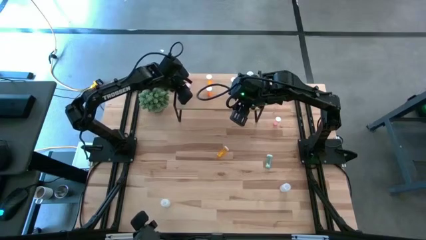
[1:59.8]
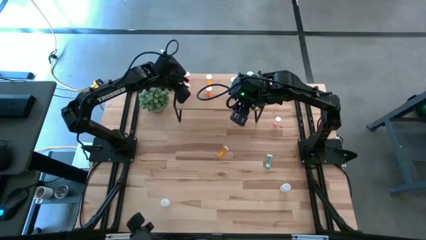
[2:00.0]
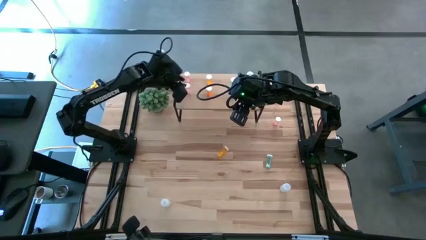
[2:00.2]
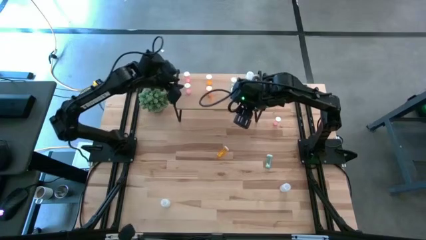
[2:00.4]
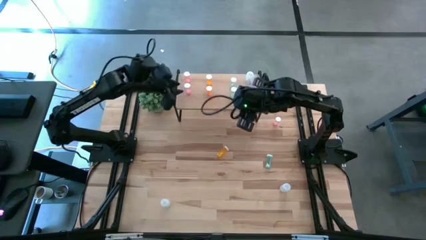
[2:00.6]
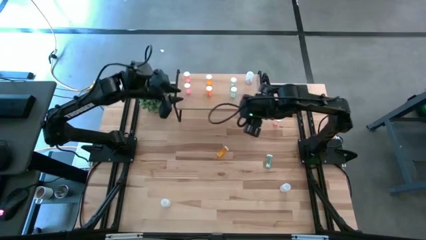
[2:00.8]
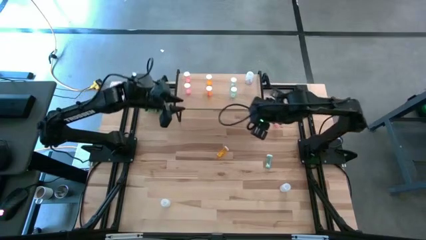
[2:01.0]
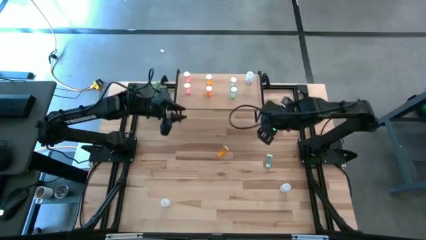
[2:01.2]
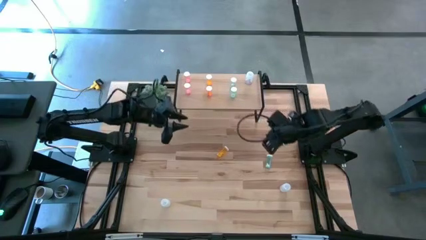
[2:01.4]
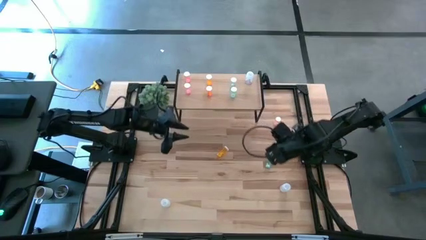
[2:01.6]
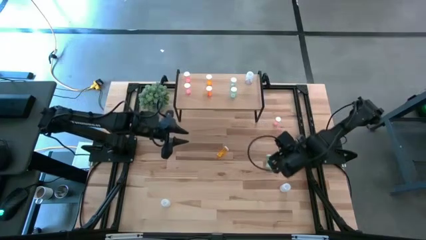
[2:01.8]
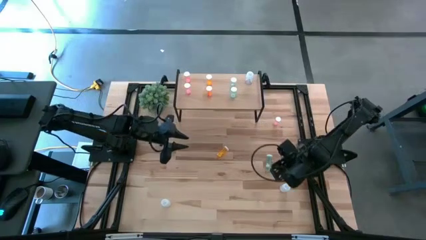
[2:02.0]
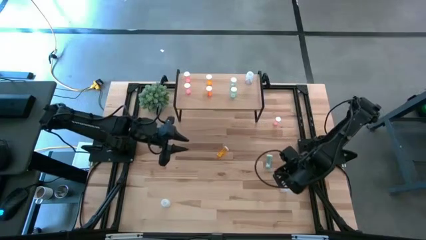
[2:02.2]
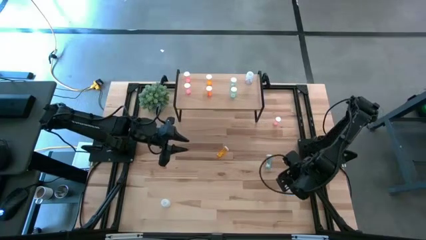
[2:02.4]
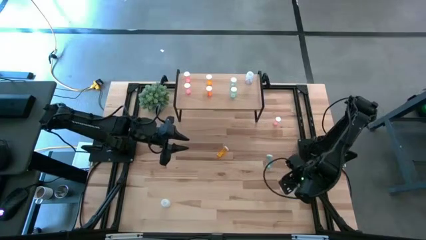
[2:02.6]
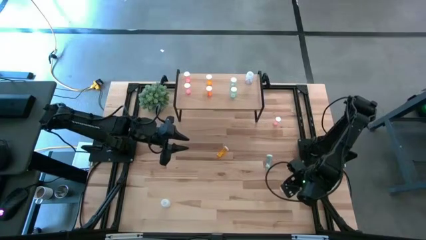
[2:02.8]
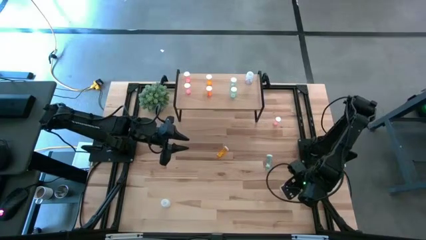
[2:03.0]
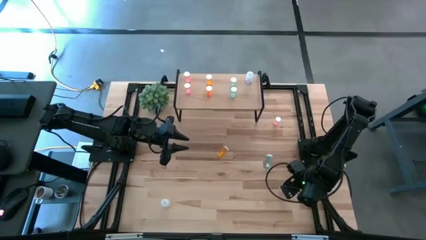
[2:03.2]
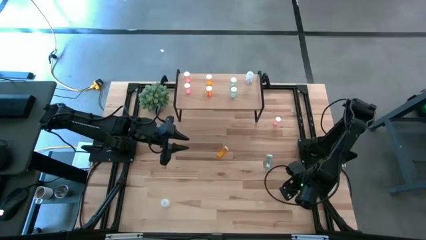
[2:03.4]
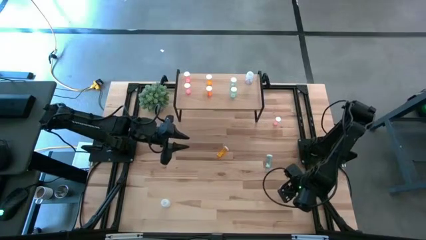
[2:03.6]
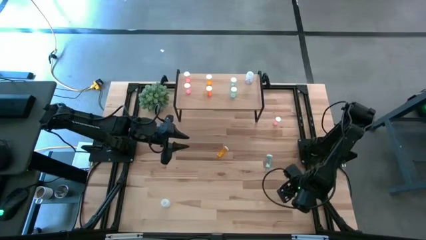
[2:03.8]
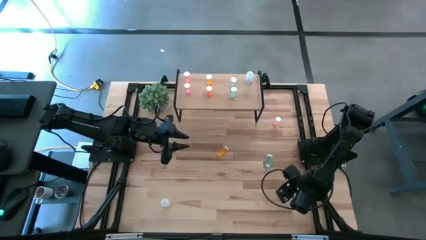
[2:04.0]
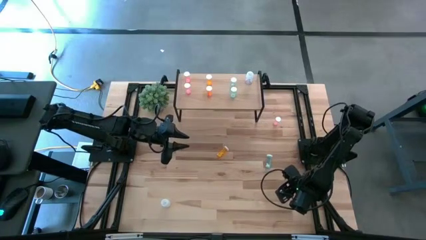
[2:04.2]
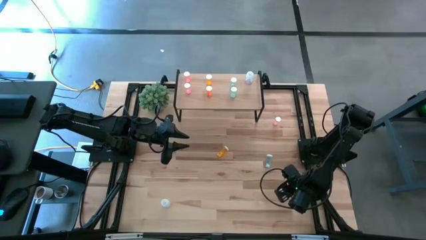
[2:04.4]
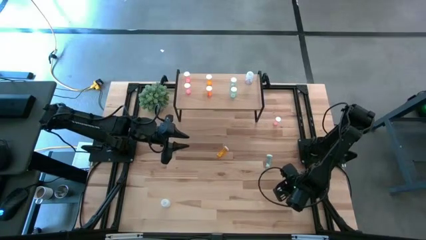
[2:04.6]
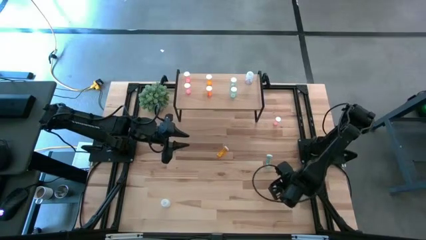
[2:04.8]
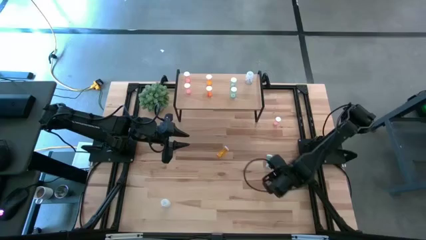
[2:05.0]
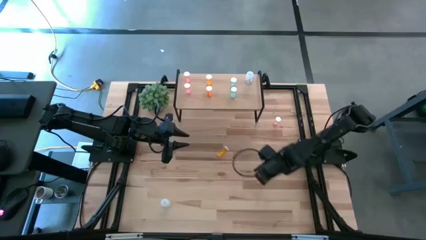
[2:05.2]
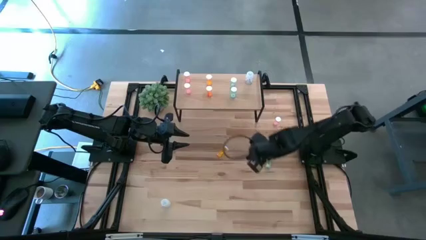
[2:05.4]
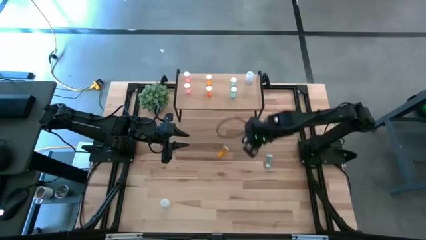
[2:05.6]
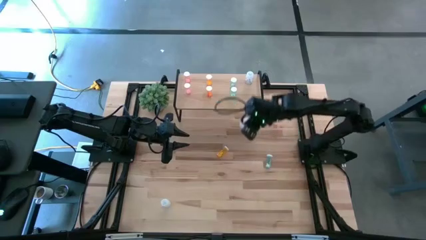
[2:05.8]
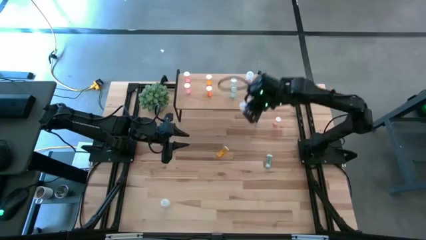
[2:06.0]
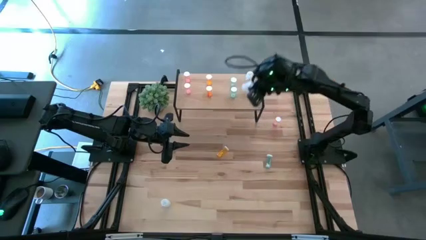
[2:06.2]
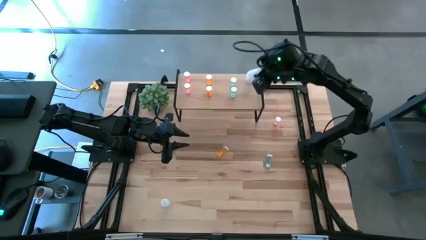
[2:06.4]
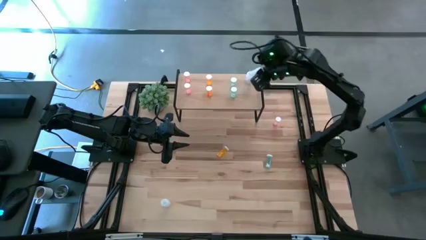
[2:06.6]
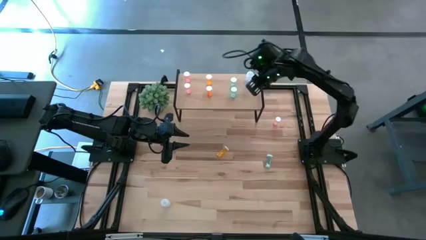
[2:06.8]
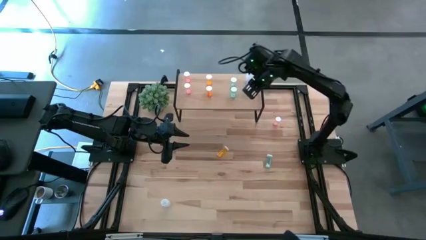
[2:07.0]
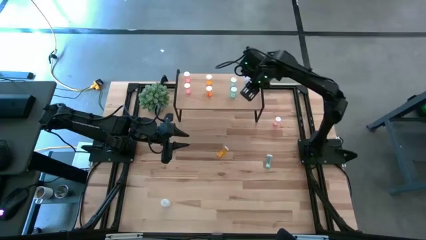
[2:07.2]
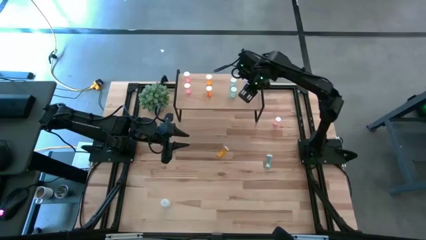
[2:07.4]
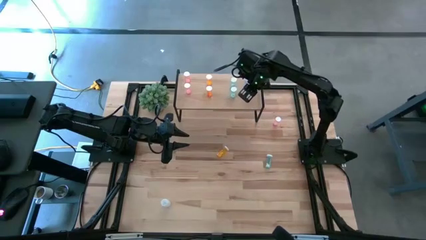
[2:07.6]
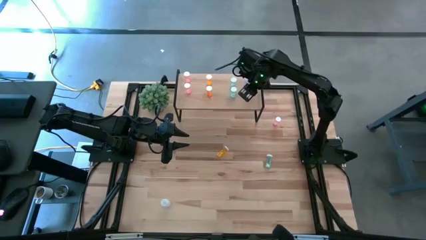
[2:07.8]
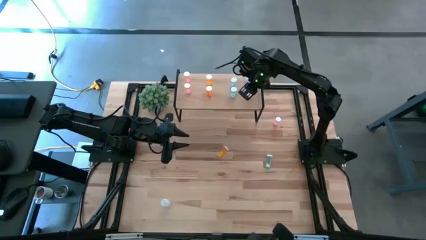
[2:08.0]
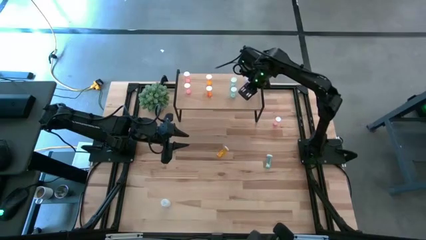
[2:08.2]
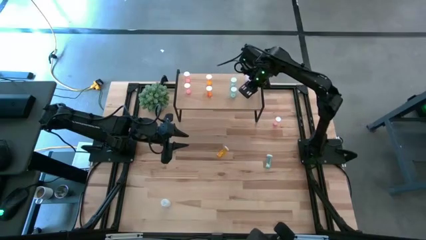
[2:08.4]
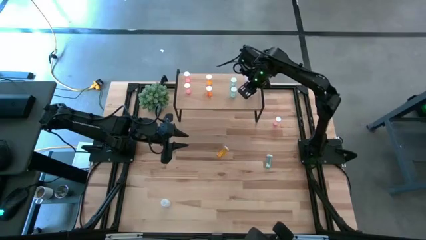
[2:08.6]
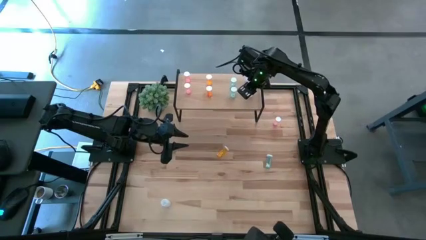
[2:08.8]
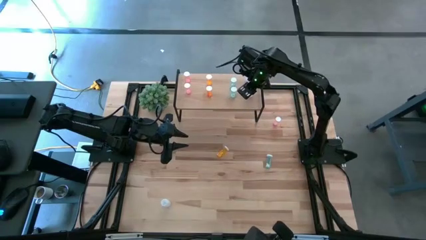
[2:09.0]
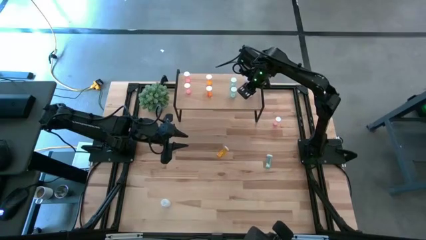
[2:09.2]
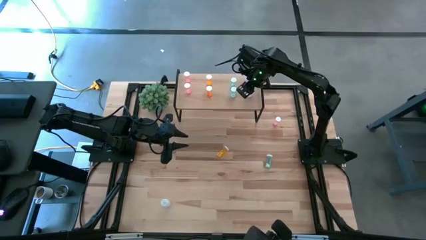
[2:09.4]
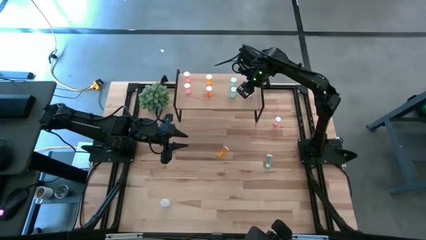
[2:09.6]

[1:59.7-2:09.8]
Task: Pick and place medicine bottles onto shelf by color
Put the right white pill bottle on the shelf aligned with the other white pill bottle

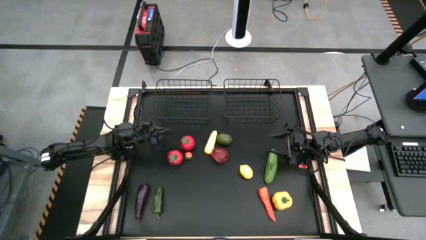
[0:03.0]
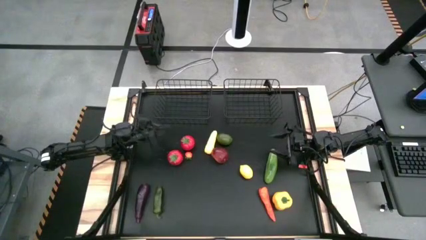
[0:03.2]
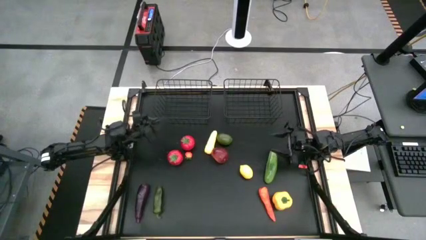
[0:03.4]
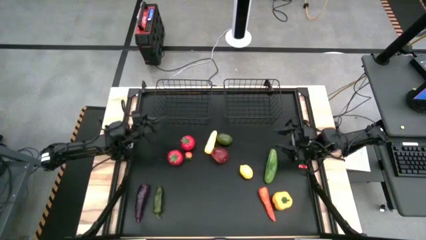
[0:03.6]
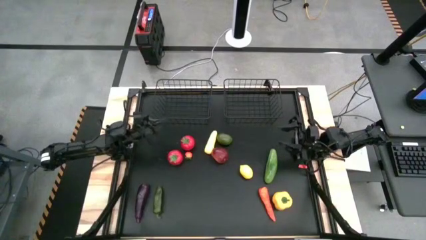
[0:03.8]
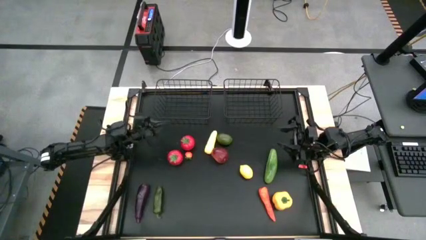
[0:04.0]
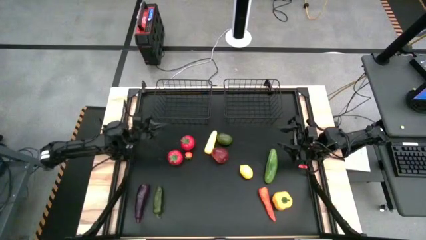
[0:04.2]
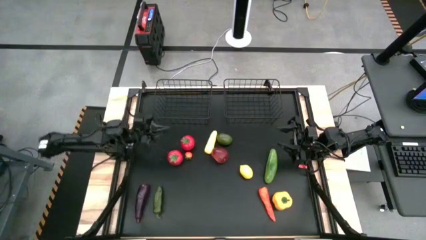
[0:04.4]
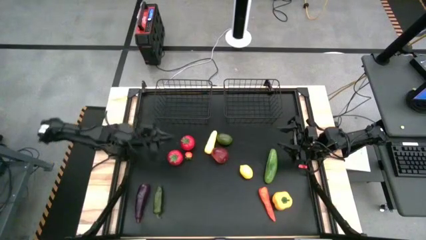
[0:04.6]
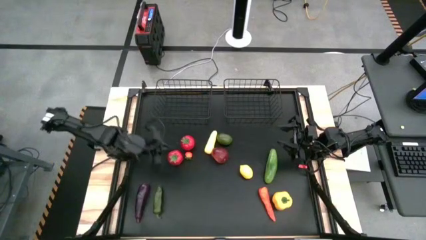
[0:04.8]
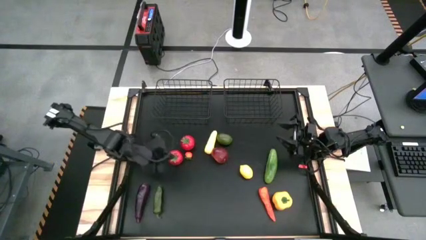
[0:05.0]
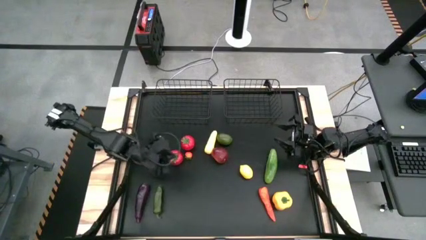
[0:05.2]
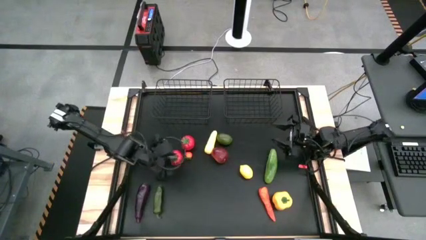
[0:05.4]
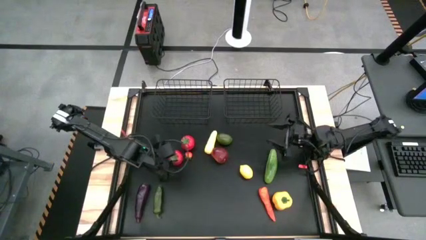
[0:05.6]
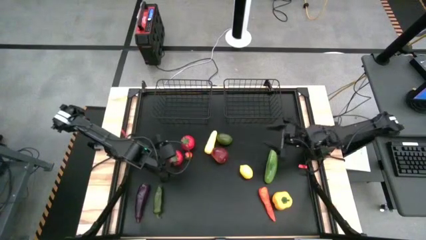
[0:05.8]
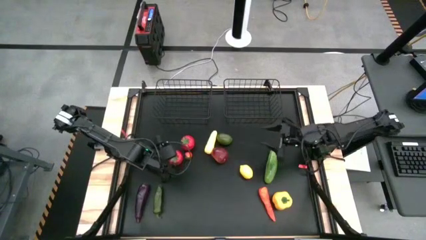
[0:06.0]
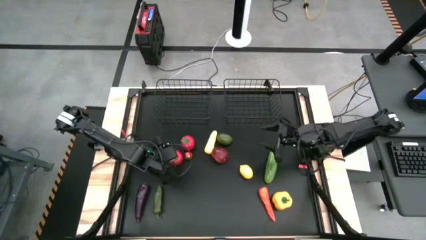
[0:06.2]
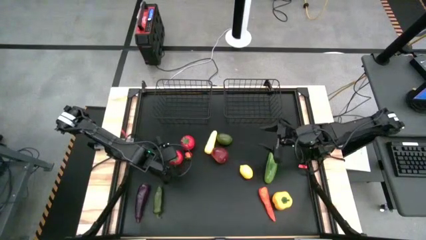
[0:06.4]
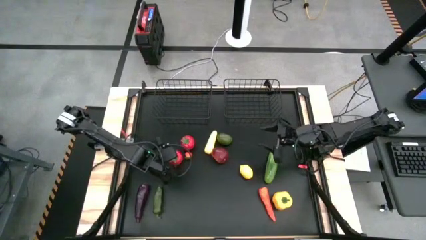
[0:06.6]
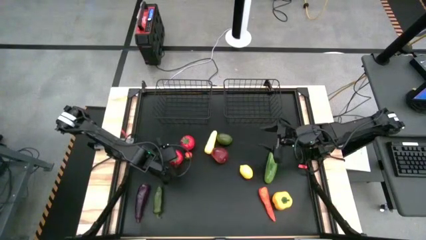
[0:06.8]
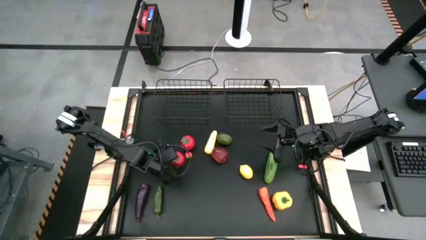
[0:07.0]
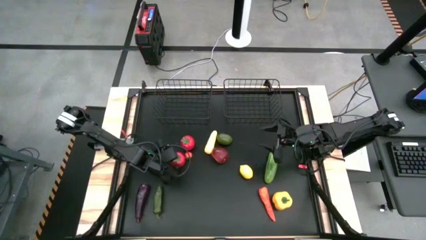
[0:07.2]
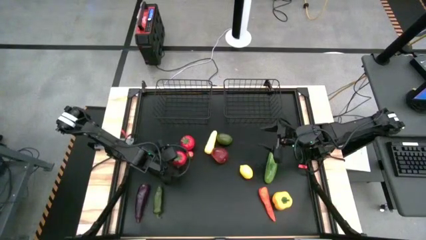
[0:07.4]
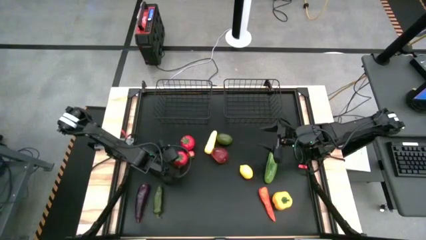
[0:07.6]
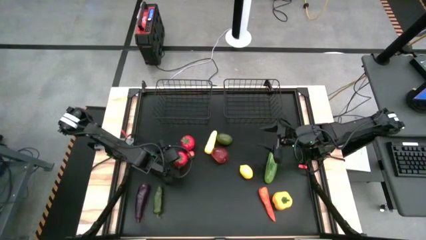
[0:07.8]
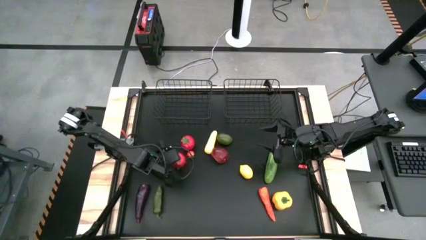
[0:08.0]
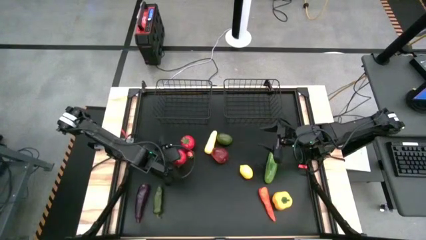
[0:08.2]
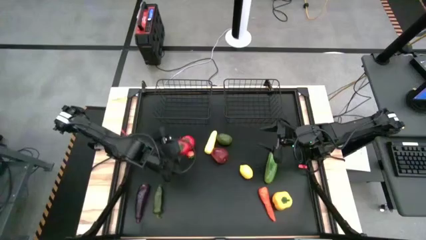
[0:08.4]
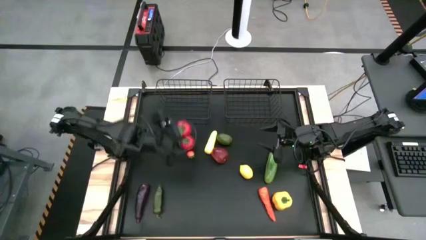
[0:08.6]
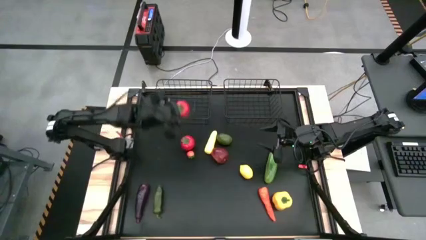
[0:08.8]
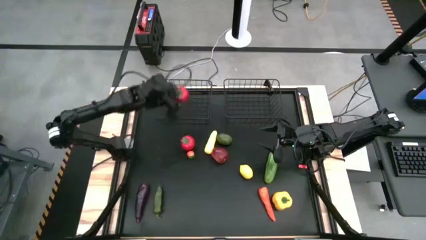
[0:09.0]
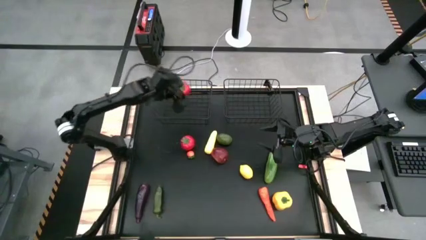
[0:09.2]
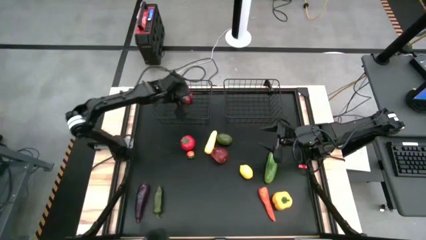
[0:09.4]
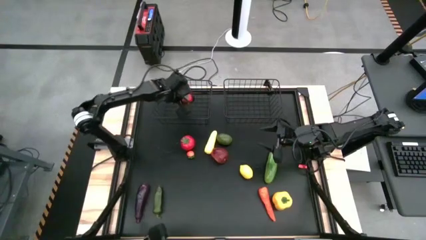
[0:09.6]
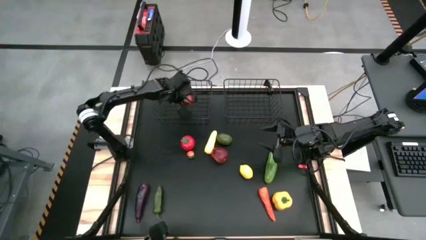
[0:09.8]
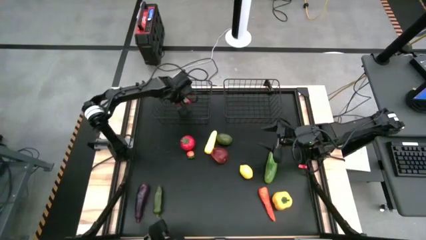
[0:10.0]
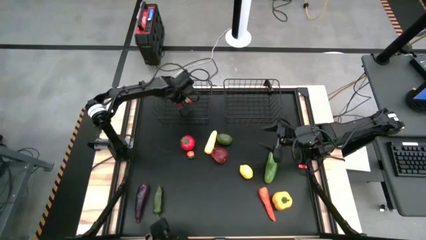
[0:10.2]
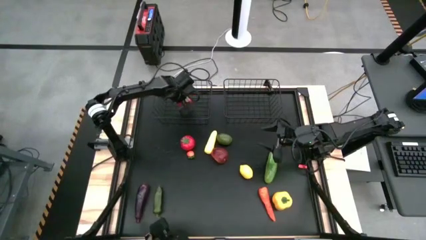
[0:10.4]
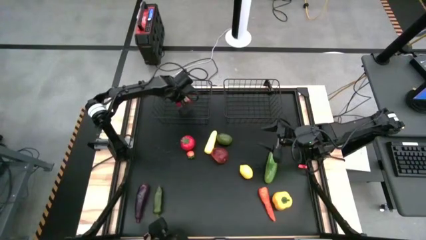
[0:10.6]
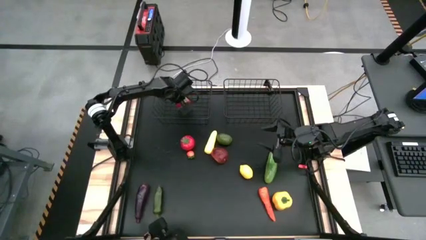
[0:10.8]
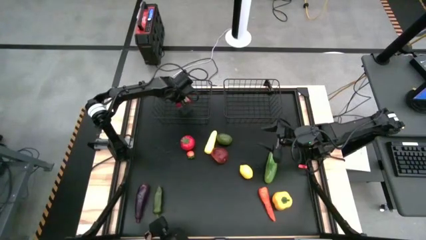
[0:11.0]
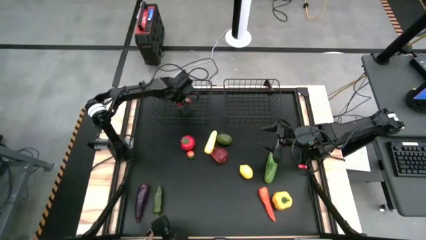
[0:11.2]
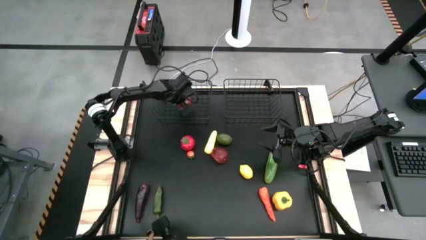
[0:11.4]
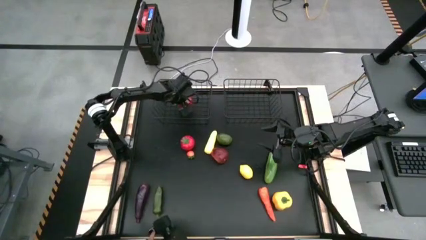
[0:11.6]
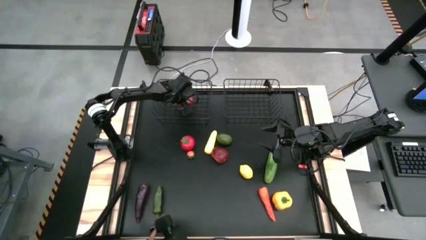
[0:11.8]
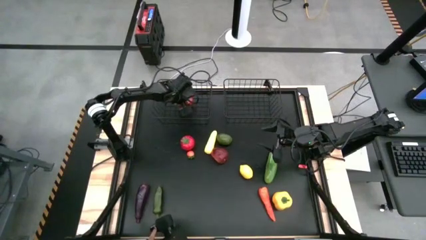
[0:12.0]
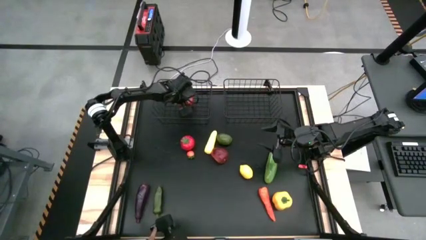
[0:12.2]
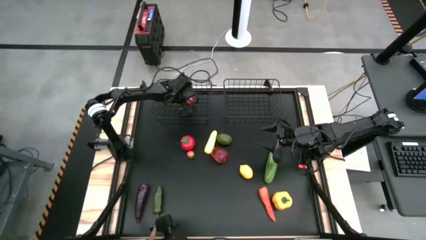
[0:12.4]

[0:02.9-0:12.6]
Task: Sort produce into baskets
Put the bottom tomato into the left wire basket
